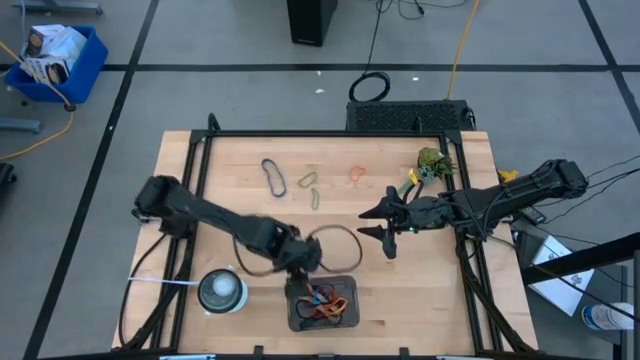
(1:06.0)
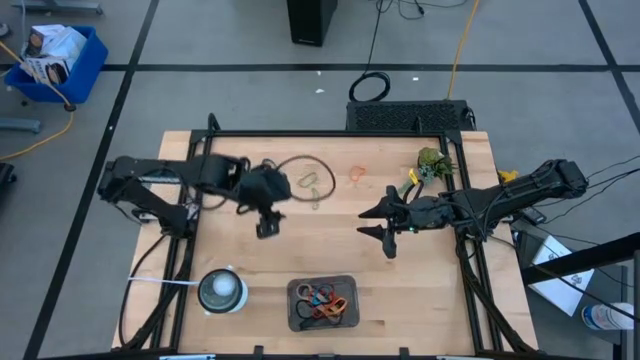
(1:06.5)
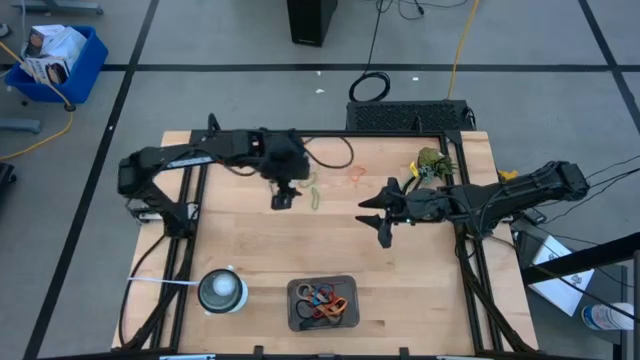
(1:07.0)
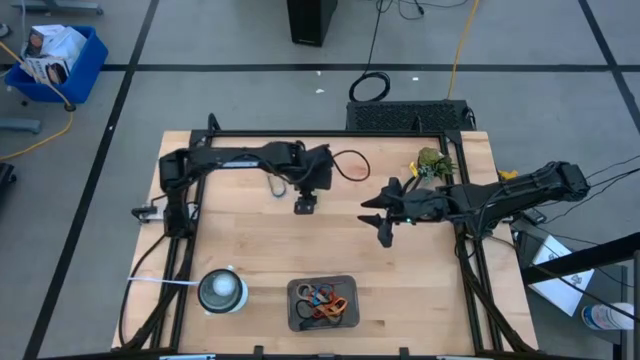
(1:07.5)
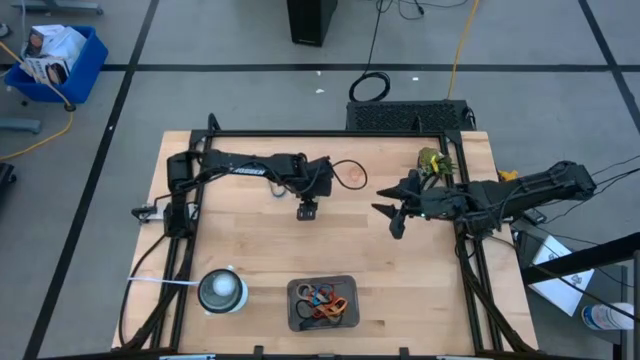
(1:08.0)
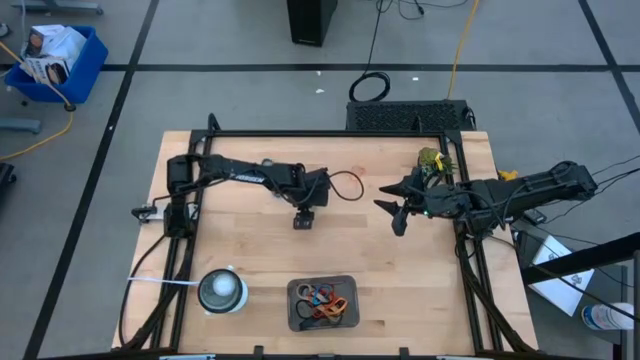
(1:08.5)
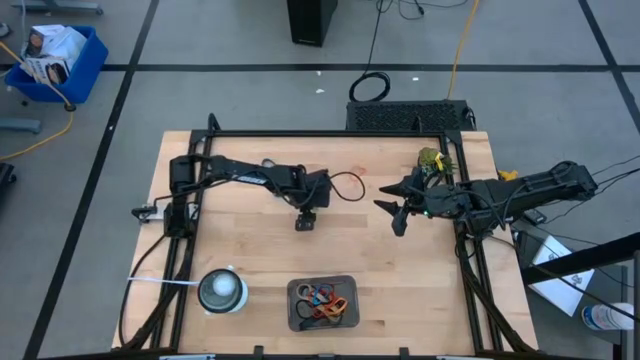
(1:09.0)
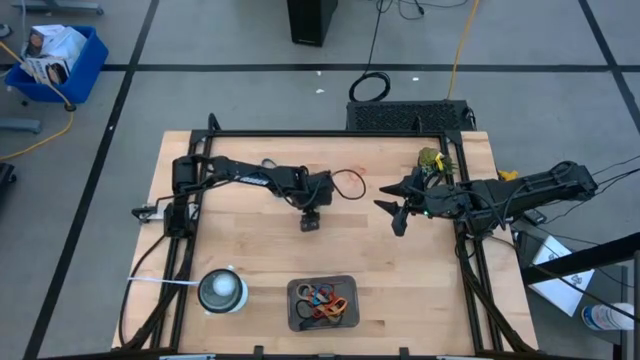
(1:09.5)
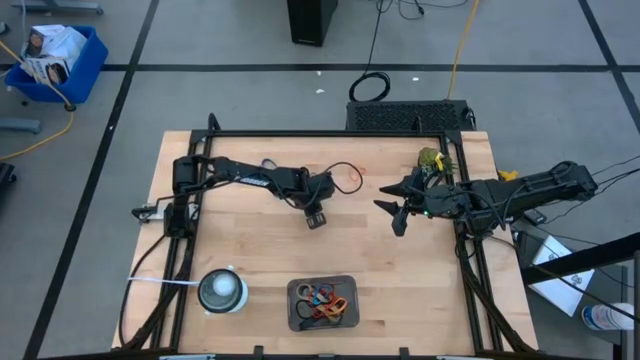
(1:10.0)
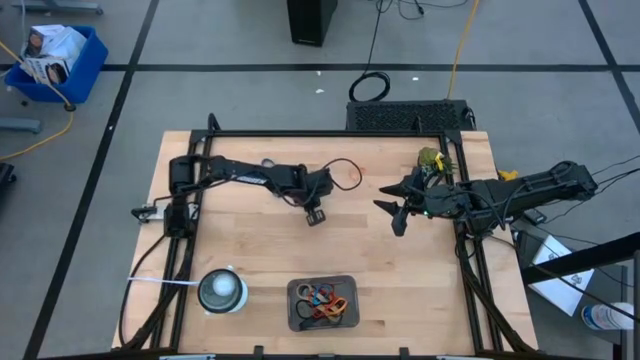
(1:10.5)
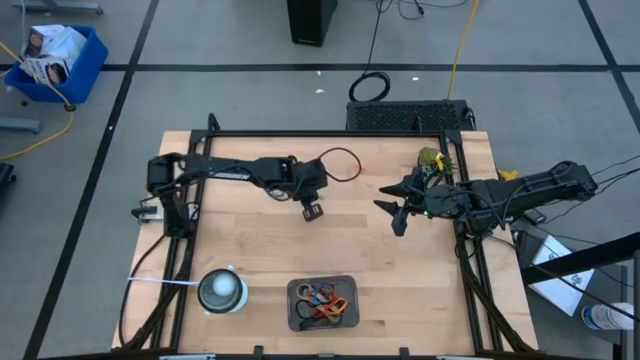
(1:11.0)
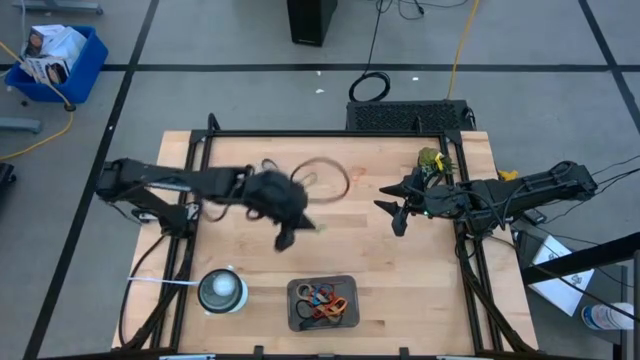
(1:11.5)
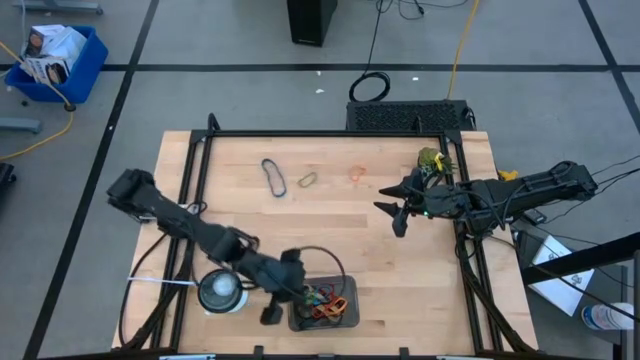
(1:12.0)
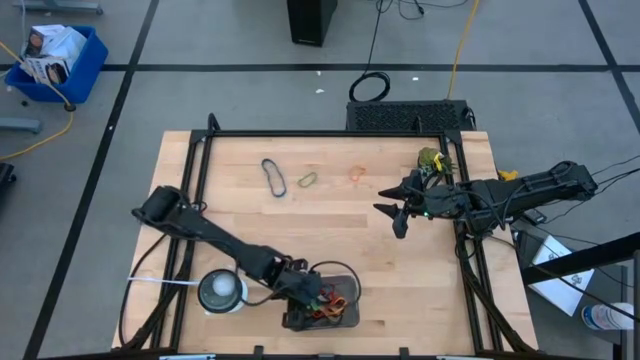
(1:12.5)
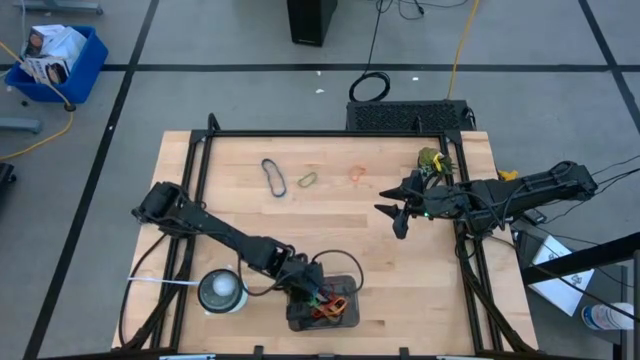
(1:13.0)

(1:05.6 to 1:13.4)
Task: Pick and place rubber bands into bin
Put the bottom green rubber band into the bin

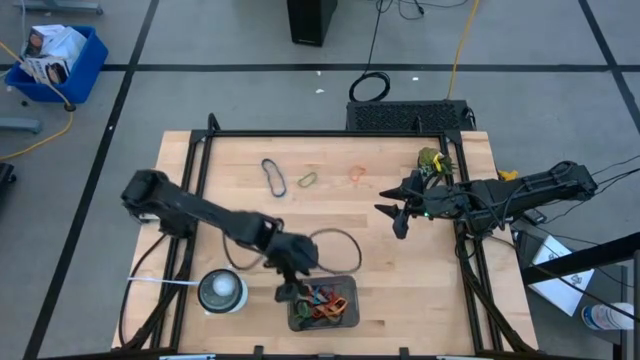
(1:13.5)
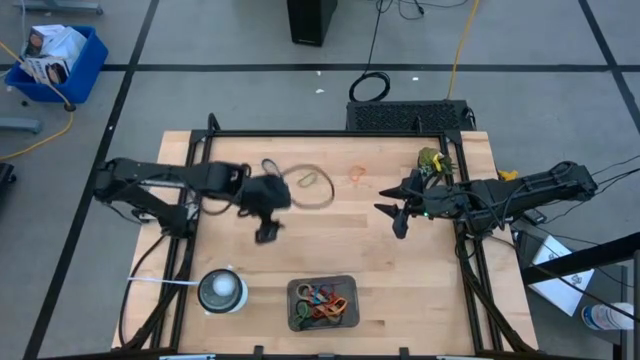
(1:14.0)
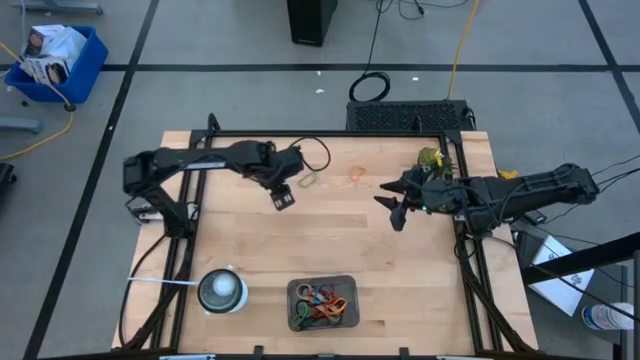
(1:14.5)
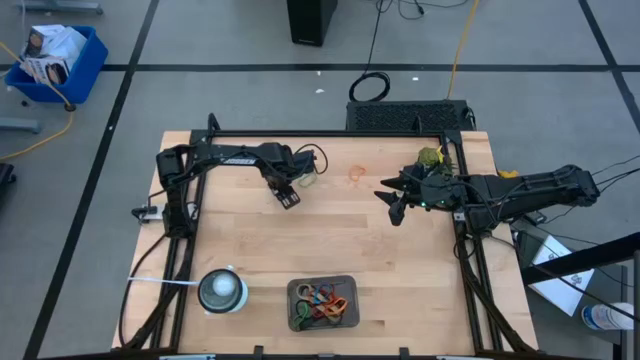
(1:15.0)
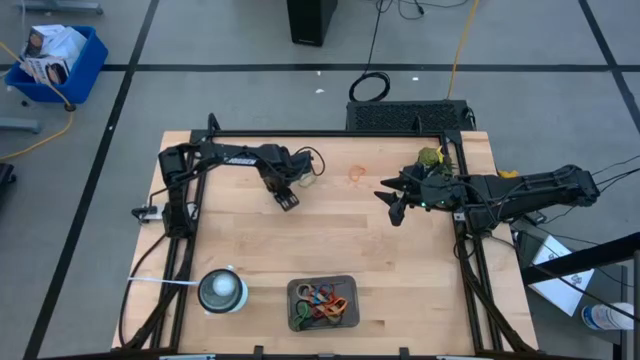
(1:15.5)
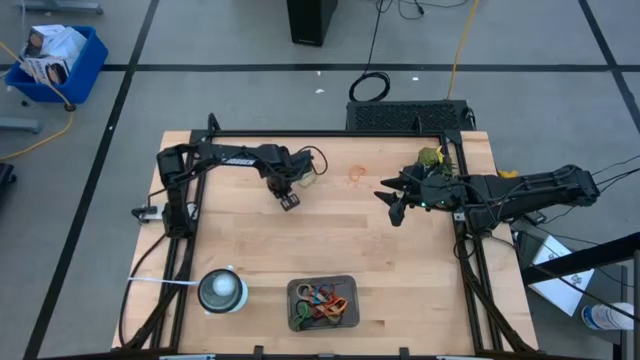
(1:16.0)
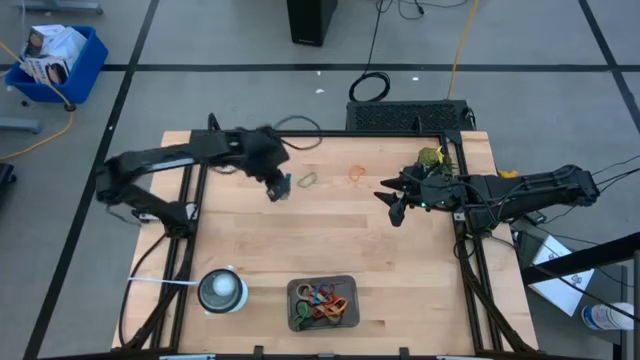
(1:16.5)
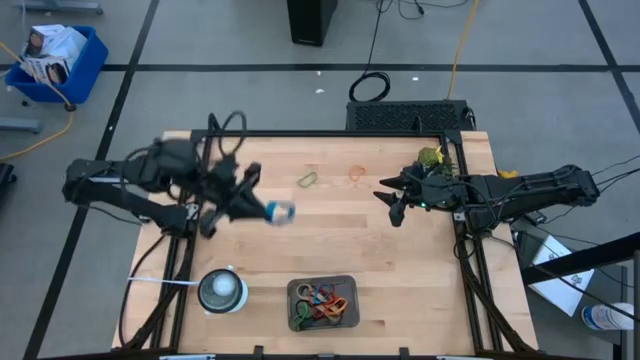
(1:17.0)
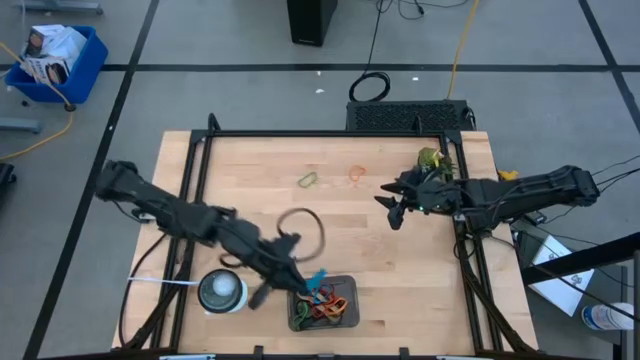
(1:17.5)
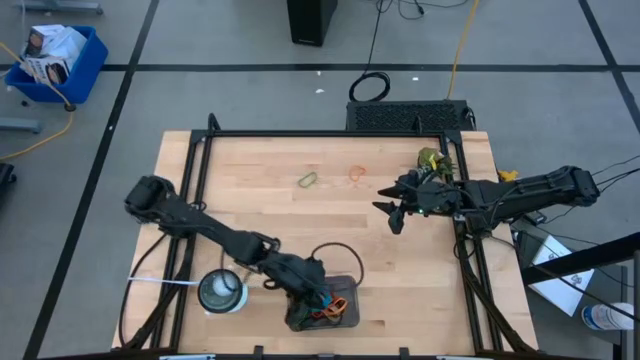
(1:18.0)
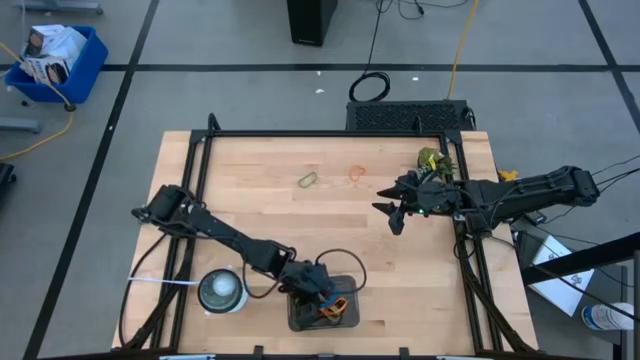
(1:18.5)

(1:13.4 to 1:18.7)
Put the blue rubber band into the bin

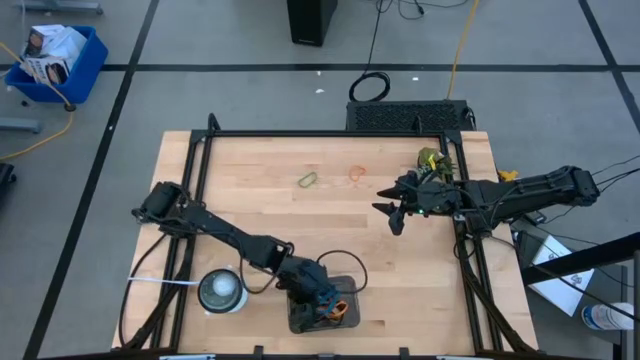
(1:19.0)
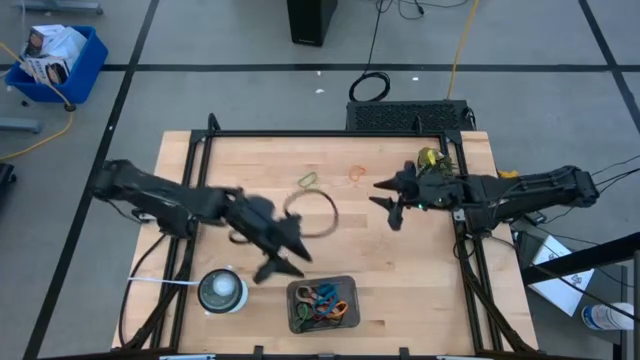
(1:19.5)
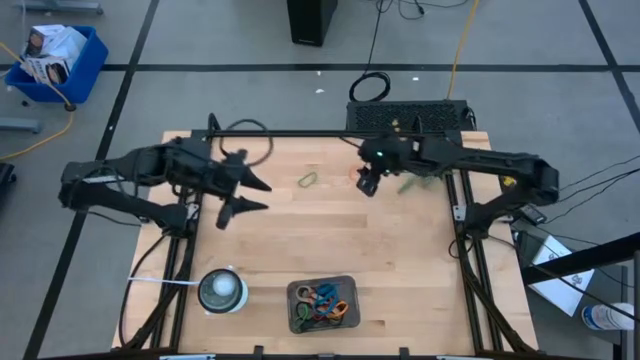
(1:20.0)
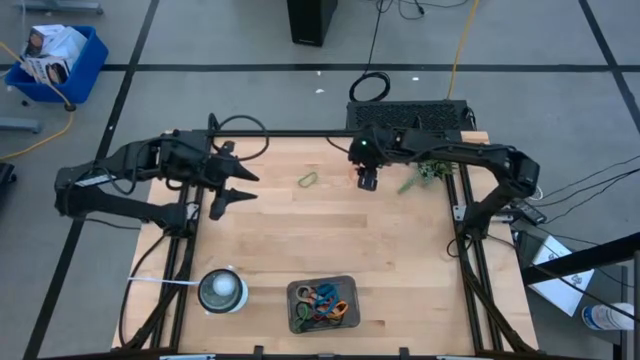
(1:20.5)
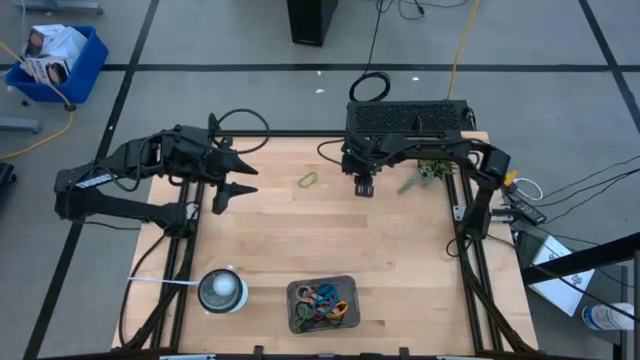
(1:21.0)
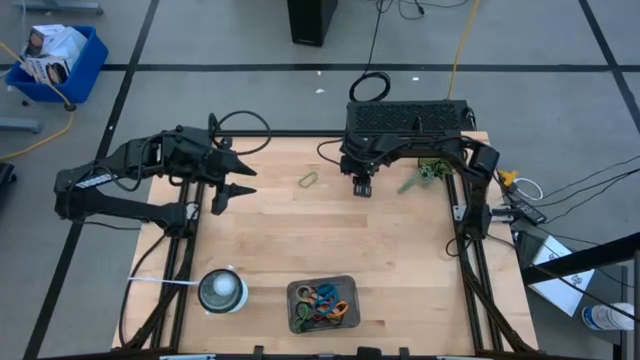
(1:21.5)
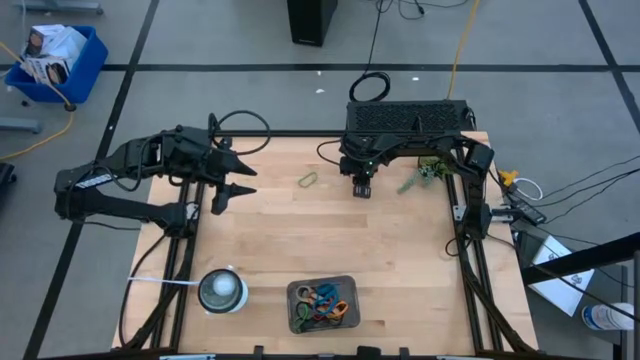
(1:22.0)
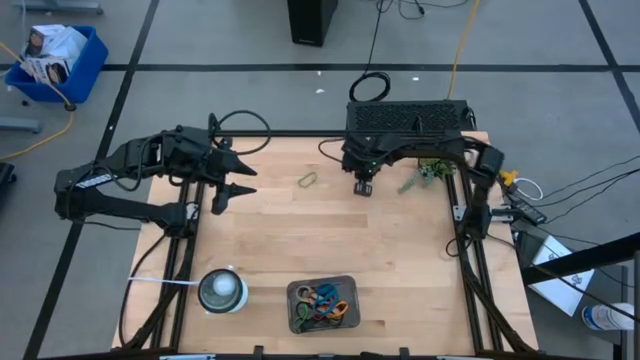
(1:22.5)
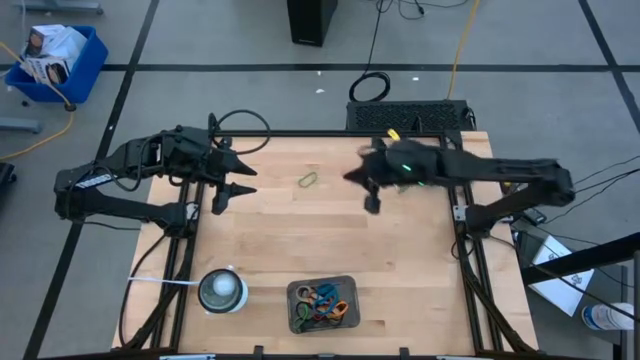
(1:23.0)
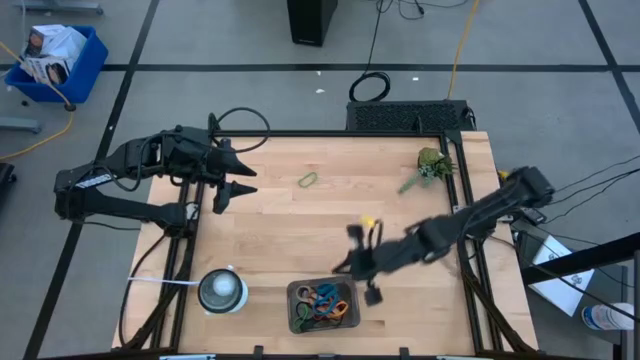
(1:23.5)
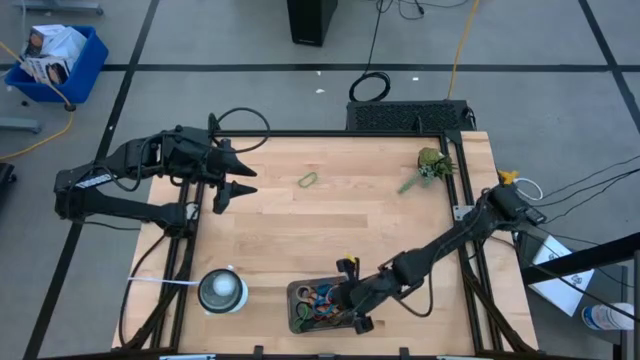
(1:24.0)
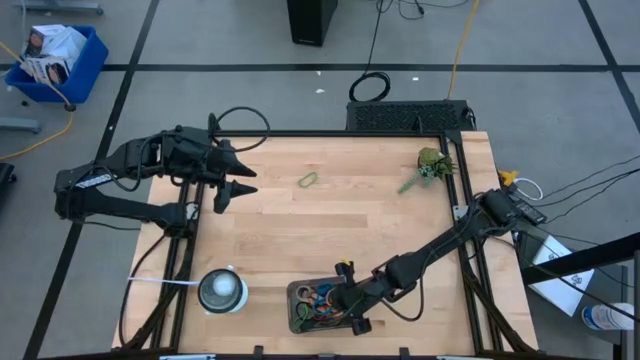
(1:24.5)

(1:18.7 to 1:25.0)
Put the orange rubber band into the bin

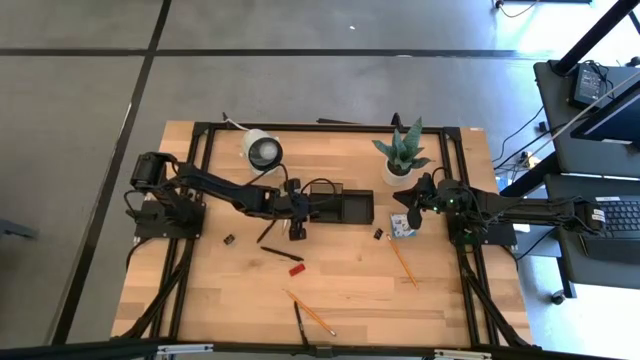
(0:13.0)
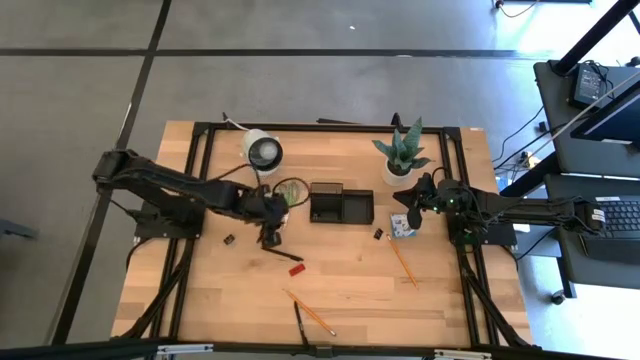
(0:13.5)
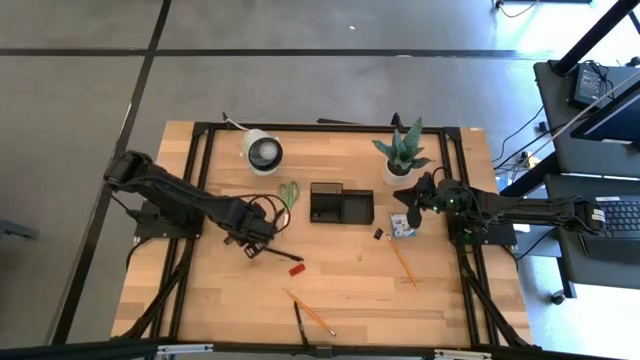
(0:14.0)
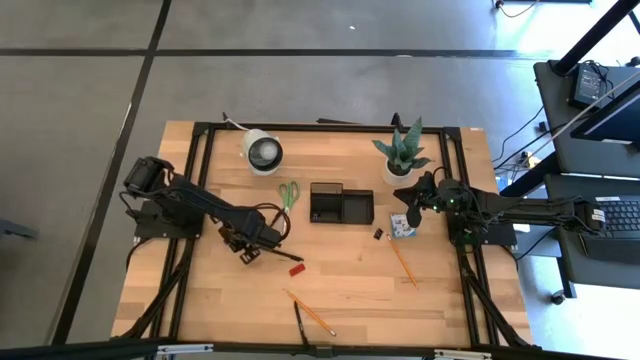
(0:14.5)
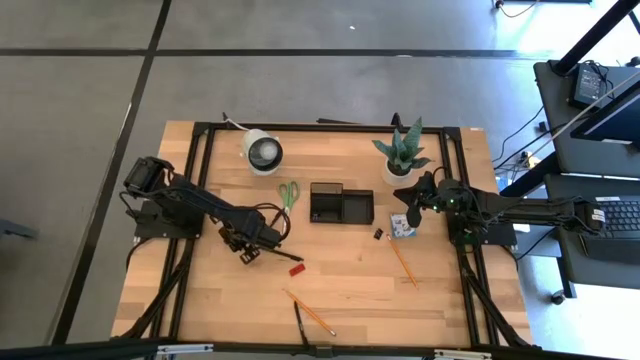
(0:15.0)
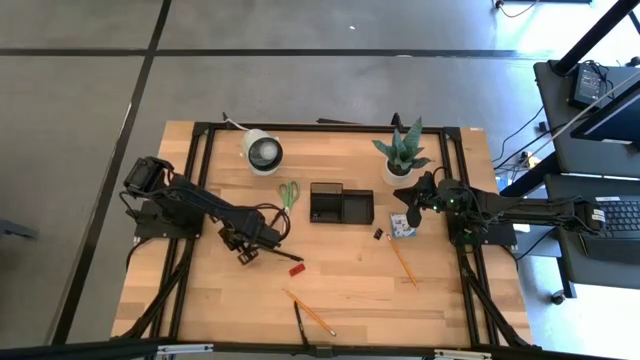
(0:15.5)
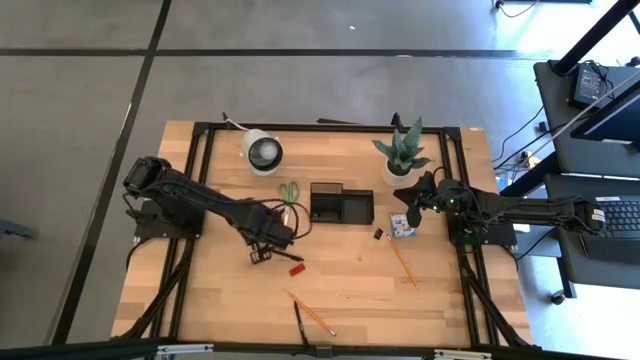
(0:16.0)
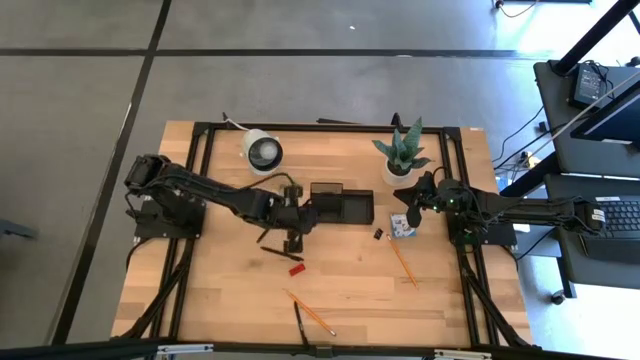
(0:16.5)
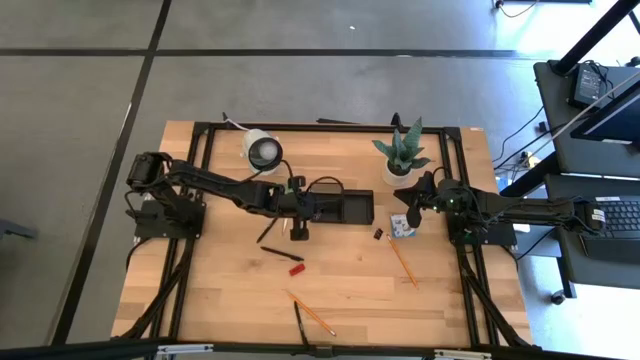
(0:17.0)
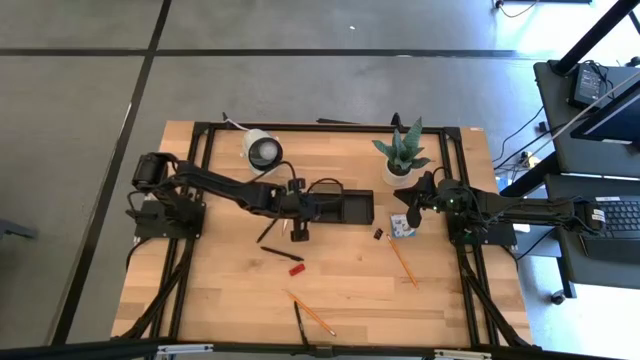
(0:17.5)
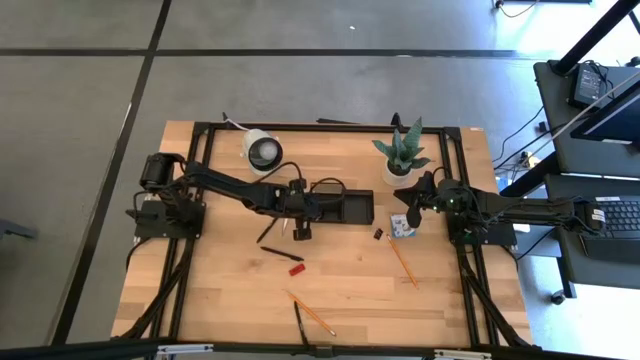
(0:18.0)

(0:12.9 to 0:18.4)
Task: Pick and place office supplies into organizer
Put the left black binder clip in the desk organizer
